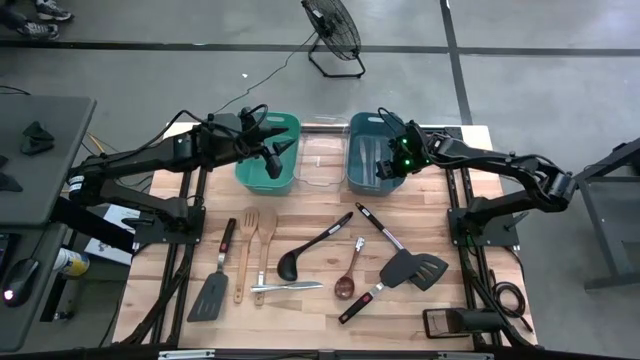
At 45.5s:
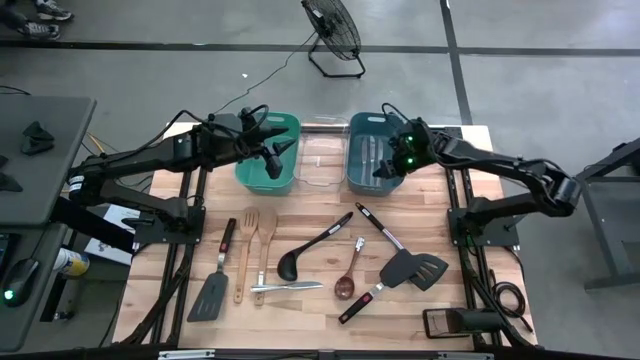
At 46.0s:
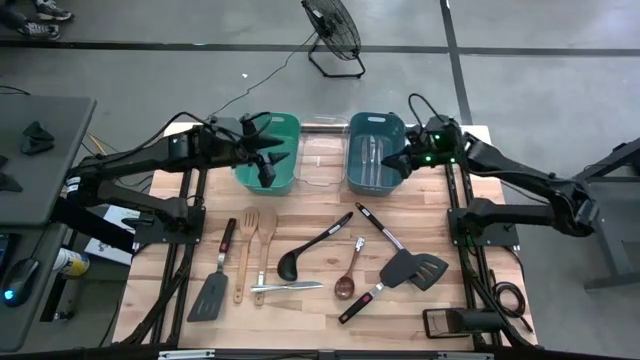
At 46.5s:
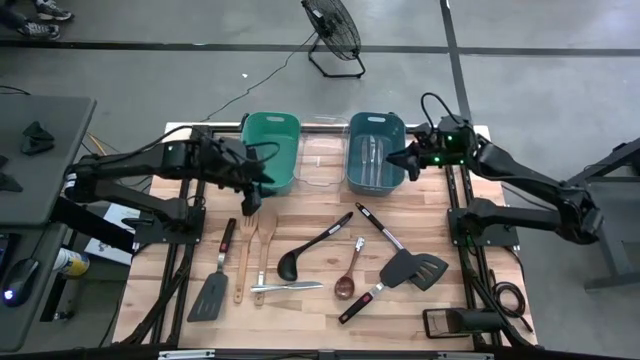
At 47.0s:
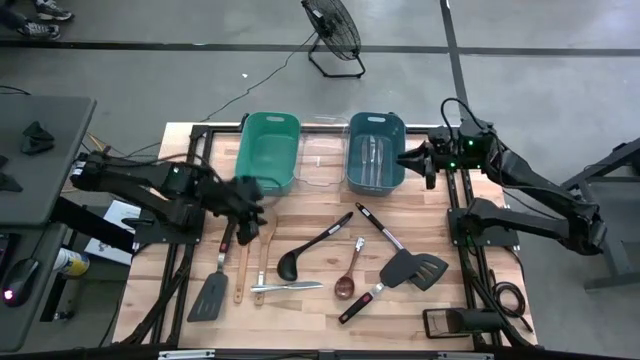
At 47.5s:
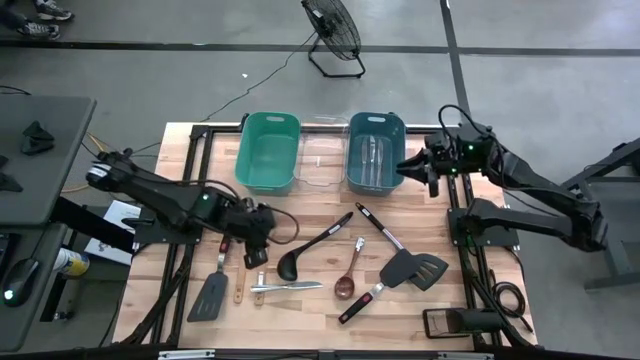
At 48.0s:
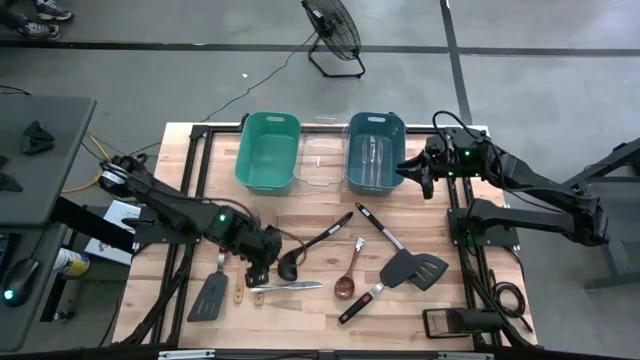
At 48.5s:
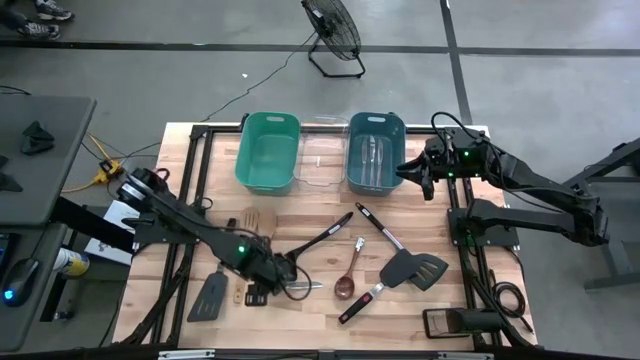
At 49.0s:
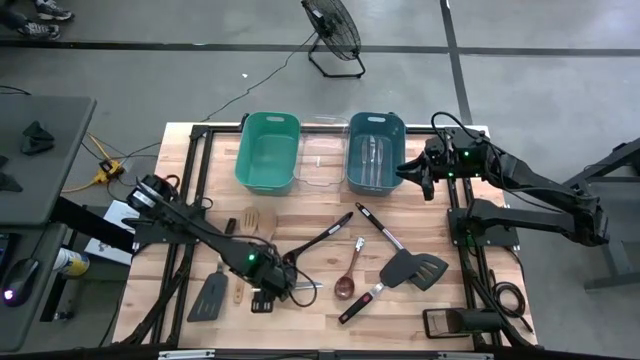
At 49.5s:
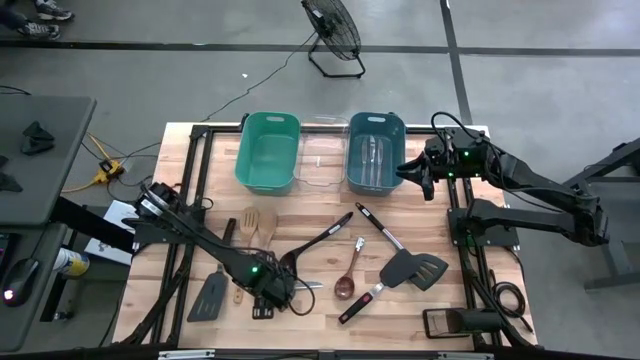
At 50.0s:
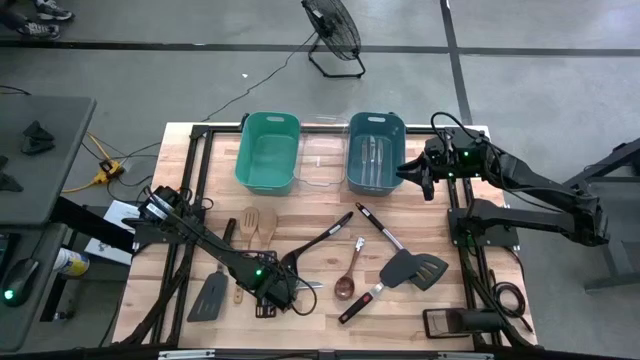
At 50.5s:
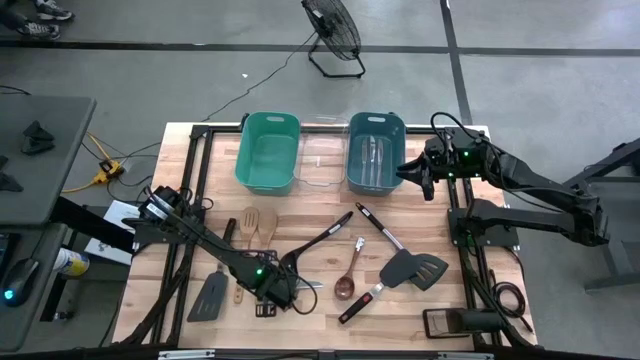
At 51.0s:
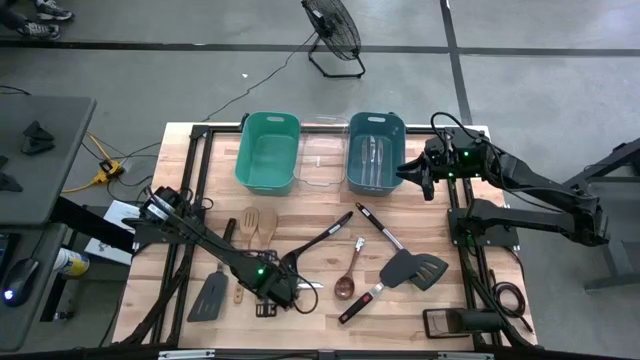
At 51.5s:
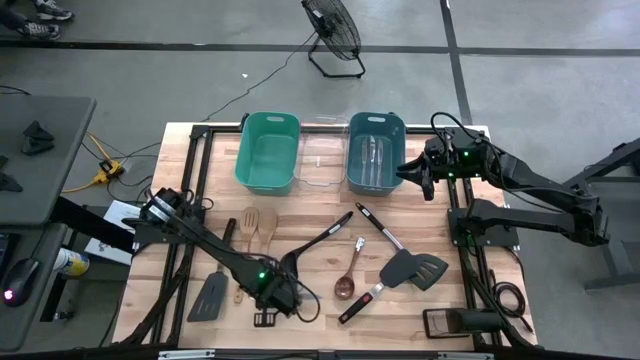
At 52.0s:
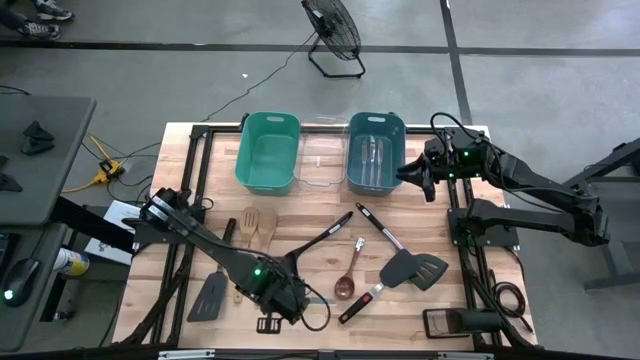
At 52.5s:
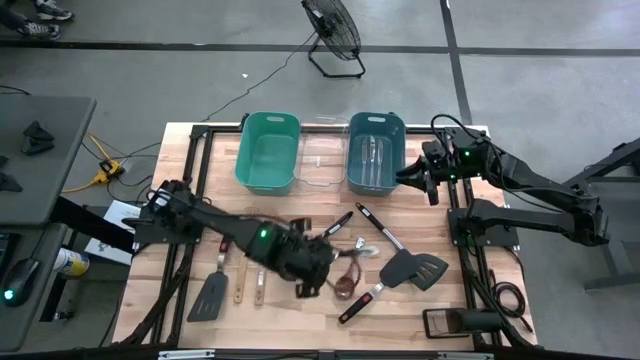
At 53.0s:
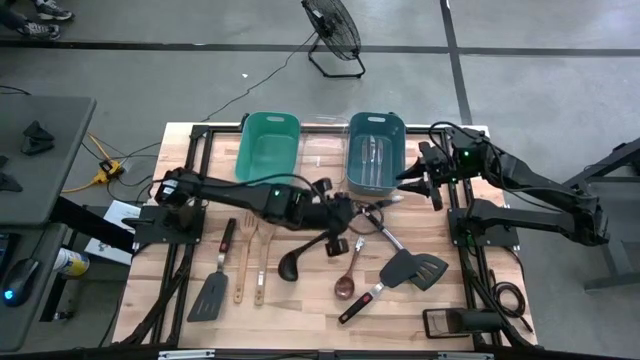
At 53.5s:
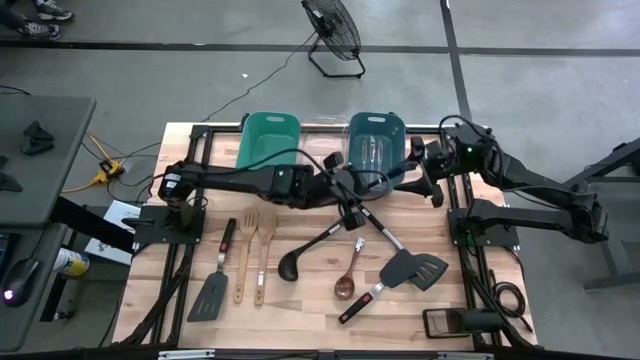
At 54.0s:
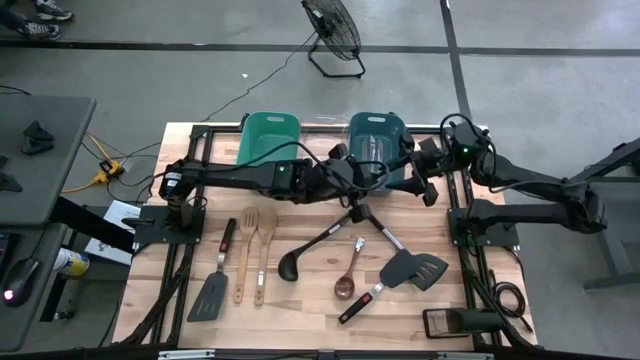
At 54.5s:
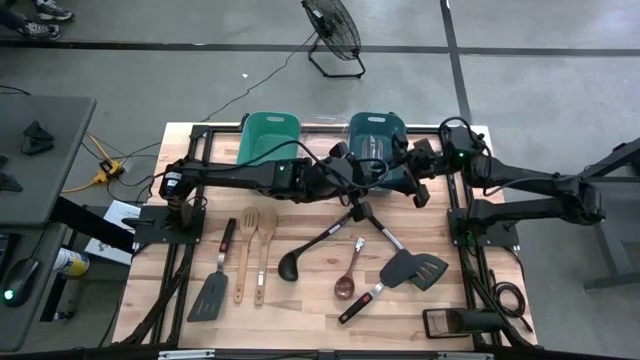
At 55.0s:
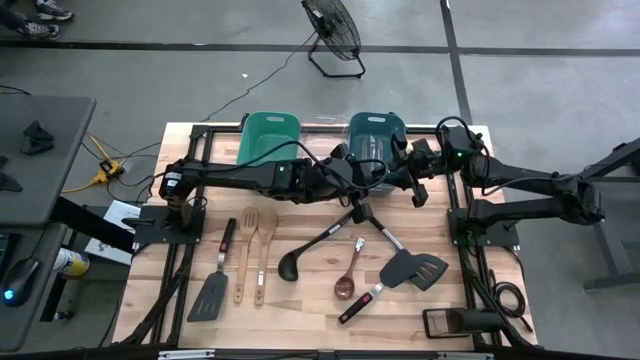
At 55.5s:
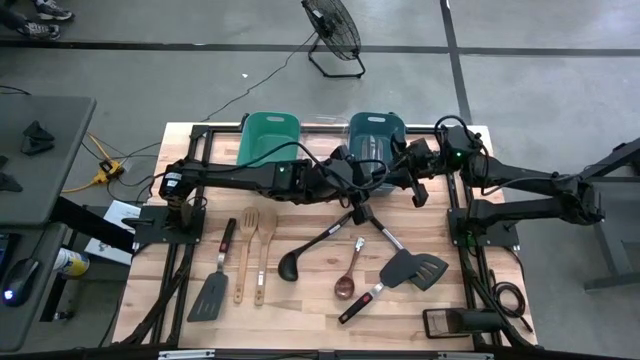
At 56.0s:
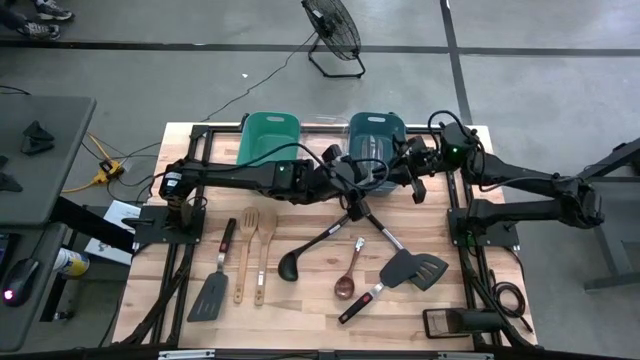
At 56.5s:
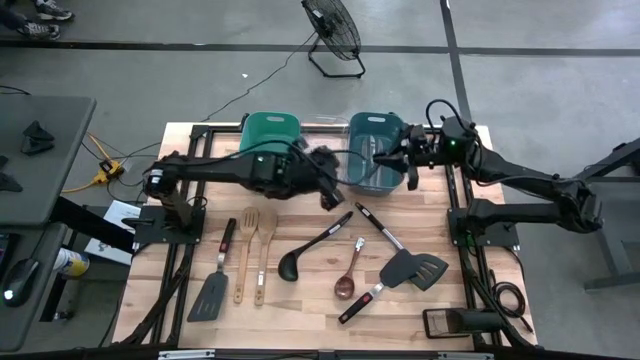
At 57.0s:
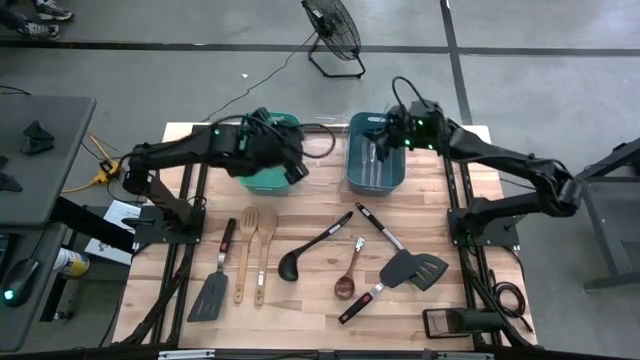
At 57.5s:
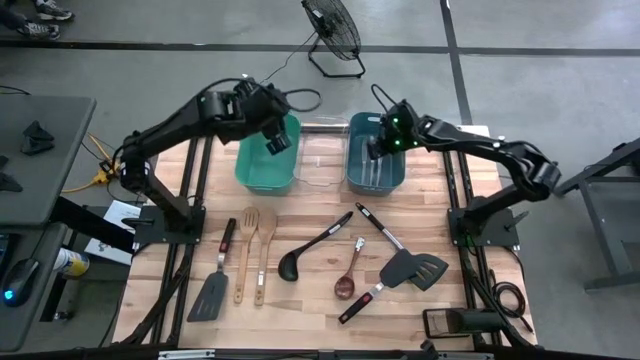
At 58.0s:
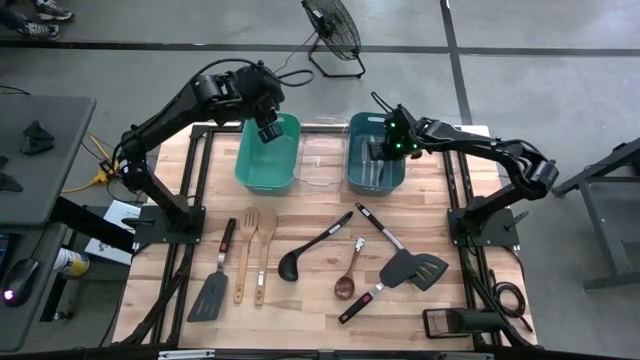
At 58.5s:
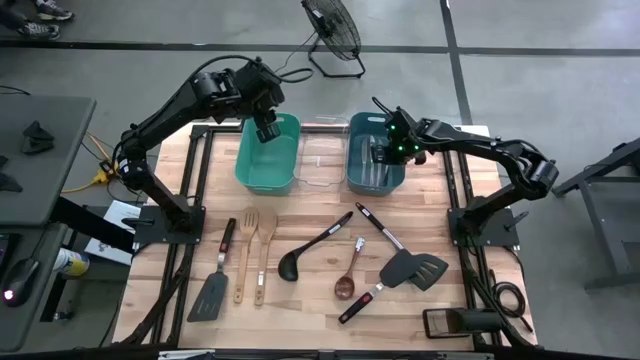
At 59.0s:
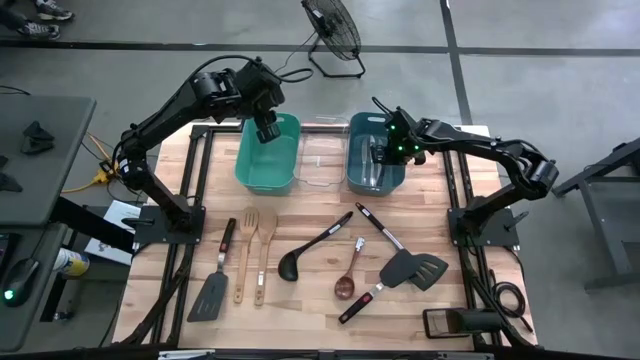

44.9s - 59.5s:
Task: Pick & Place Kitchen Items
Put the silver table knife into the blue bin
